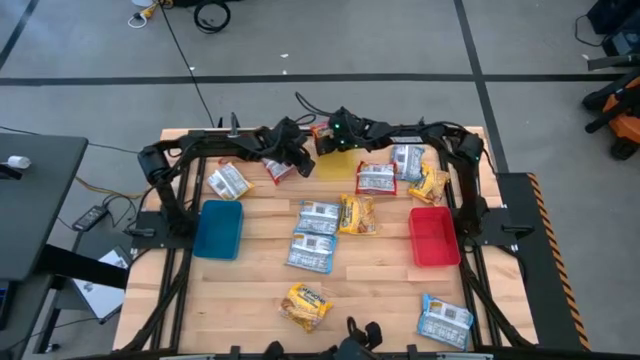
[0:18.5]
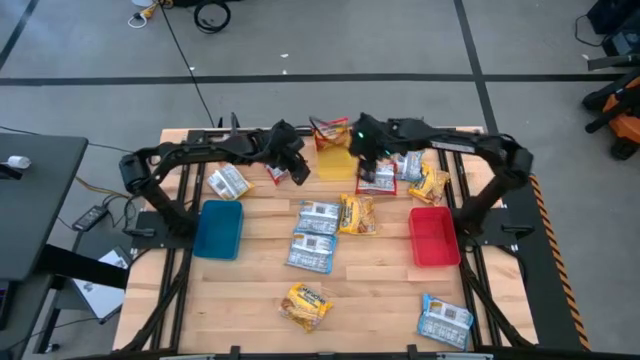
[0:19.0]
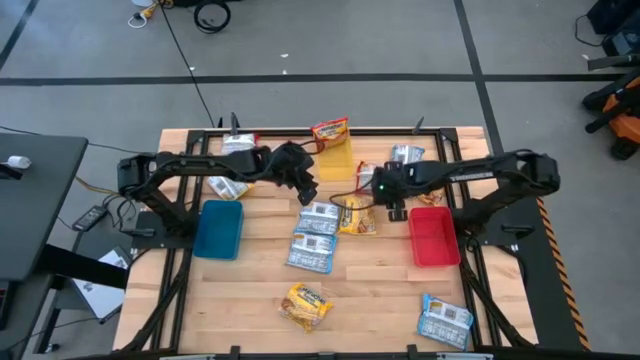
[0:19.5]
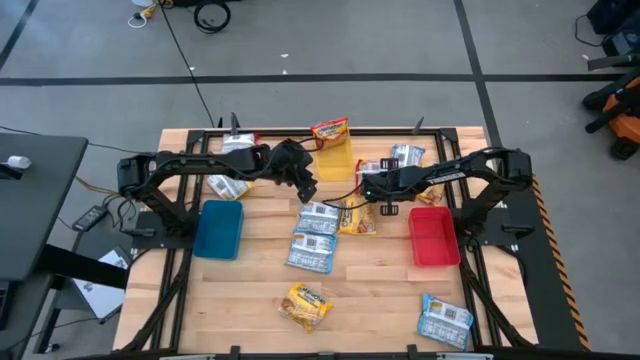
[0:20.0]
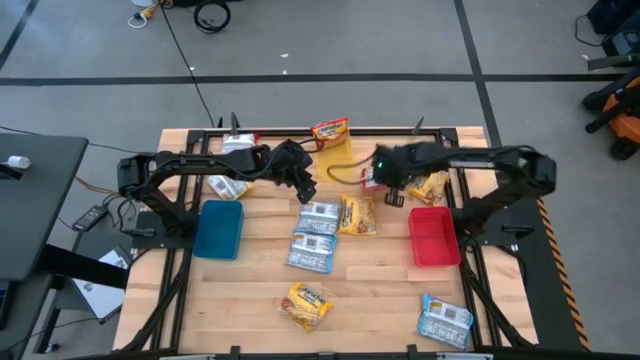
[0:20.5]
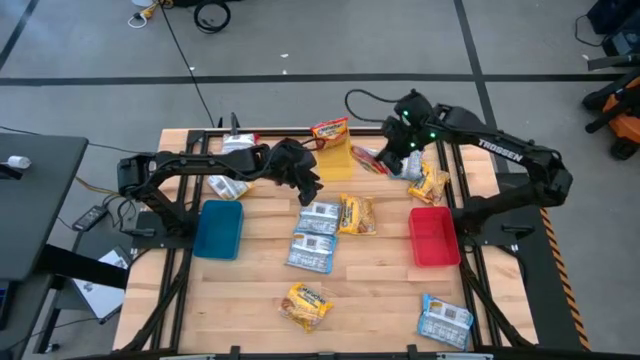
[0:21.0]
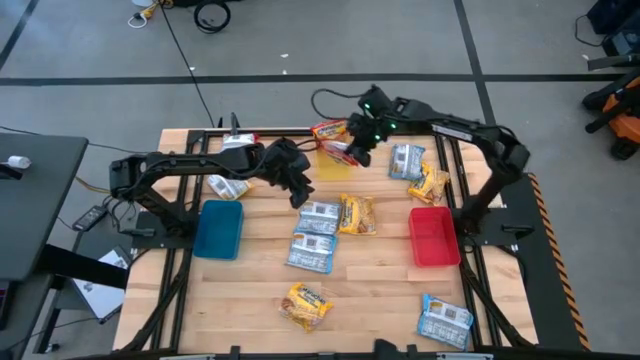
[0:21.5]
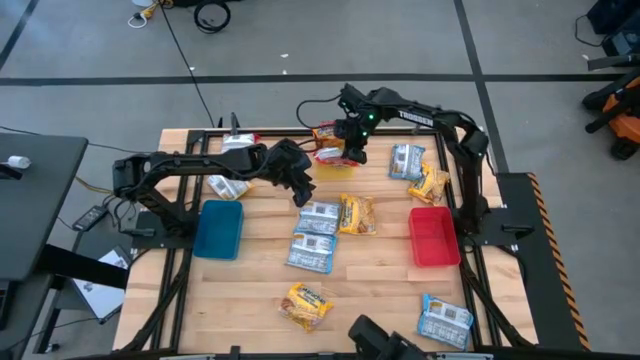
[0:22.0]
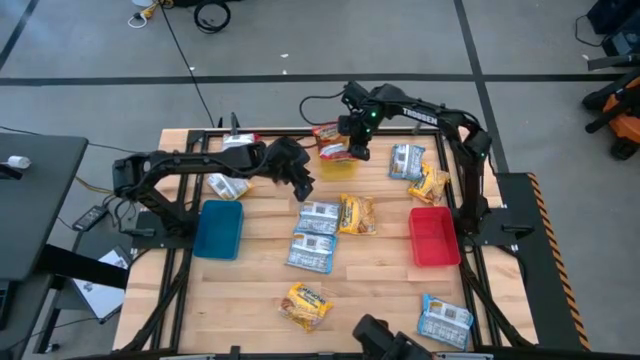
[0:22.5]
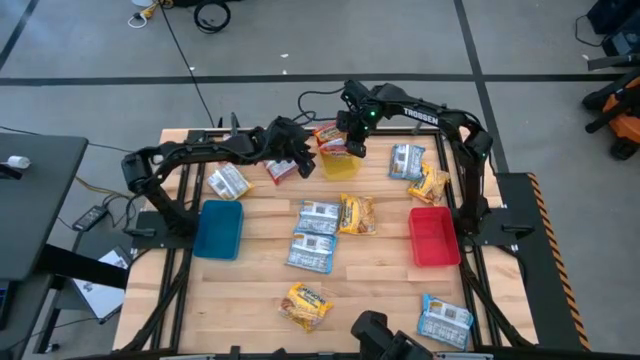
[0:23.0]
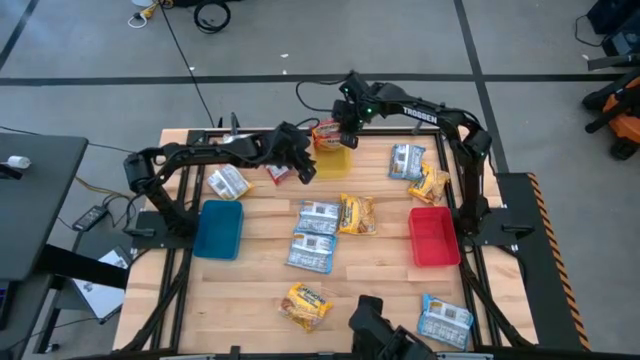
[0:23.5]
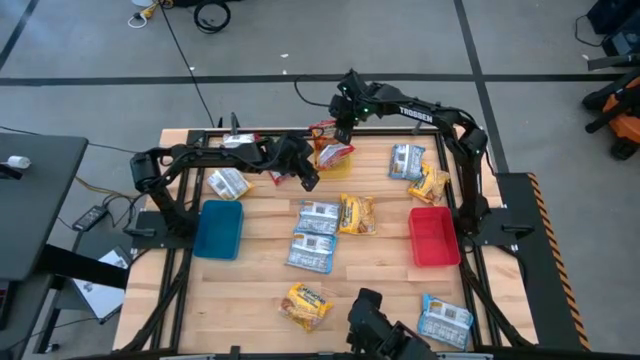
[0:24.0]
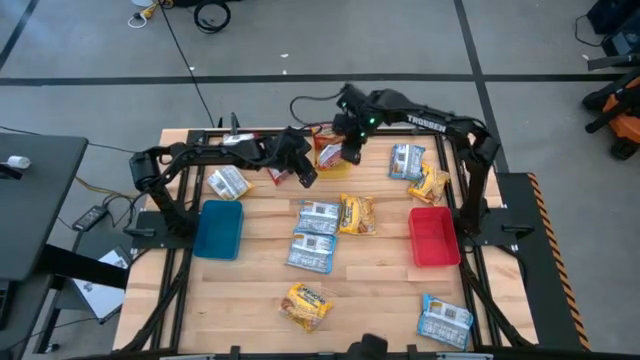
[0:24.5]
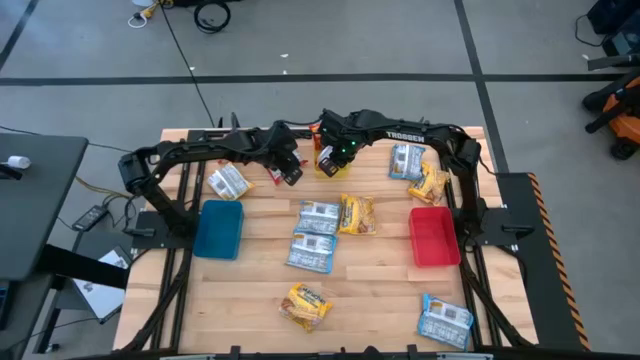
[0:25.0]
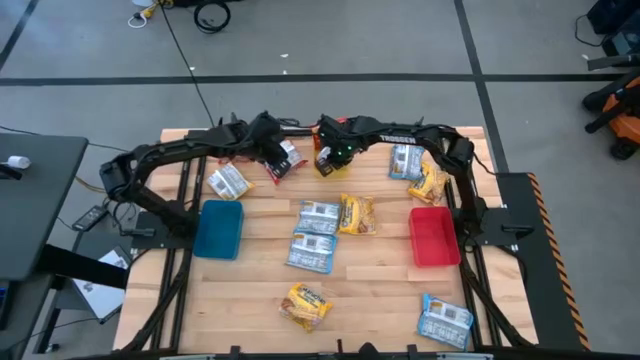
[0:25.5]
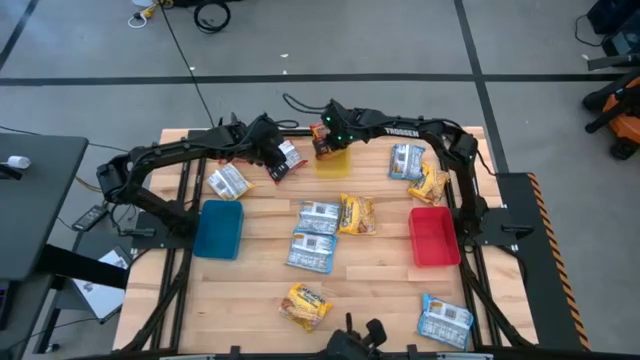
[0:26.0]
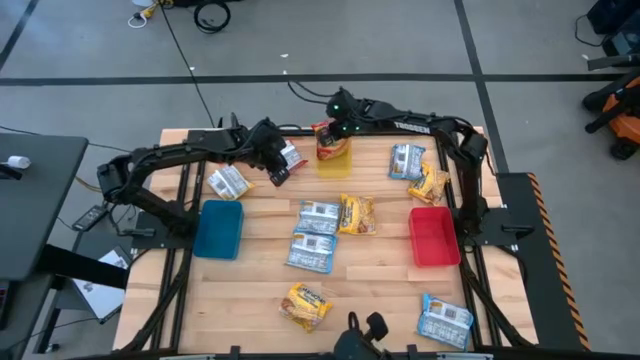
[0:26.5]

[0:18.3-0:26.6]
Task: Sort Maruchan noodles
Put the right red noodle pack into the yellow bin

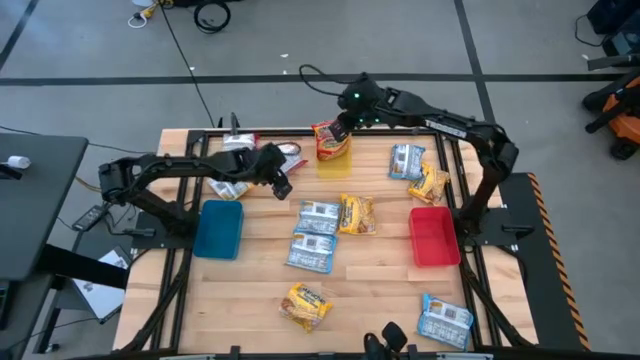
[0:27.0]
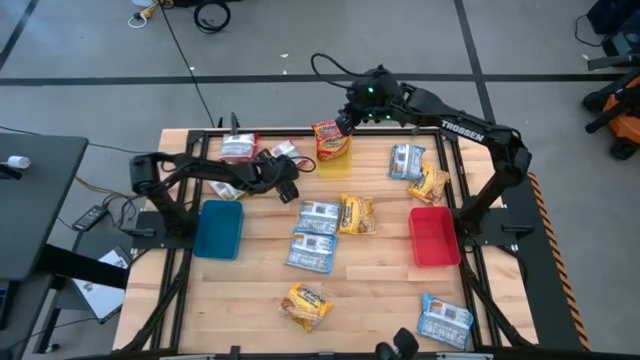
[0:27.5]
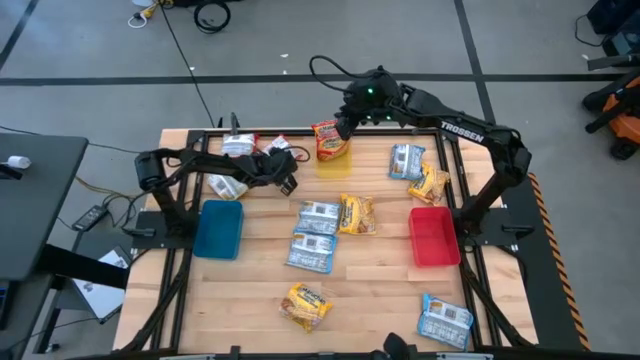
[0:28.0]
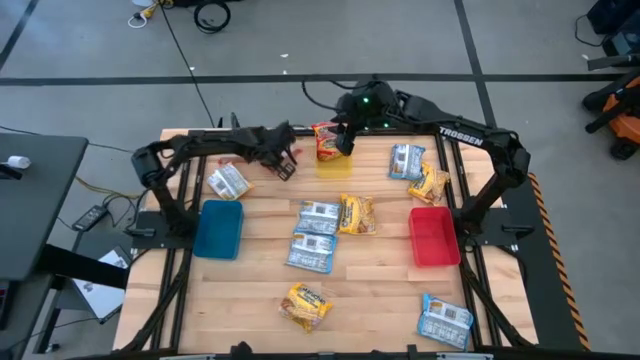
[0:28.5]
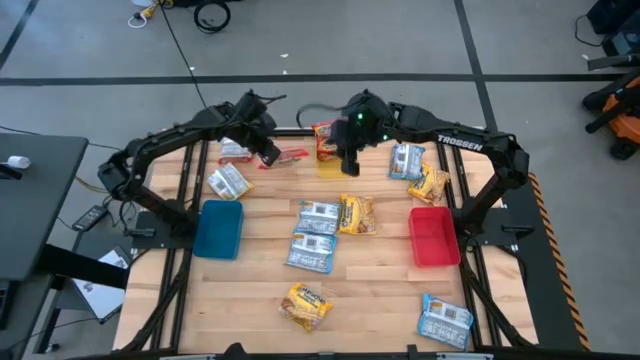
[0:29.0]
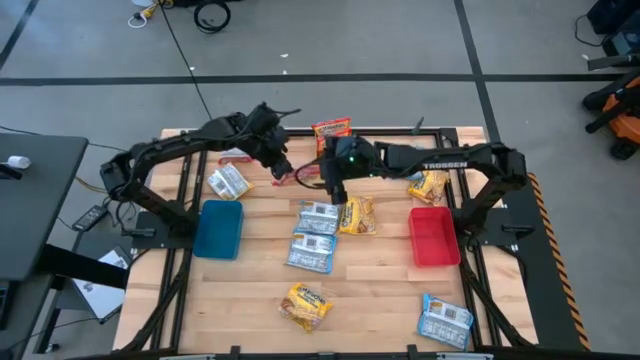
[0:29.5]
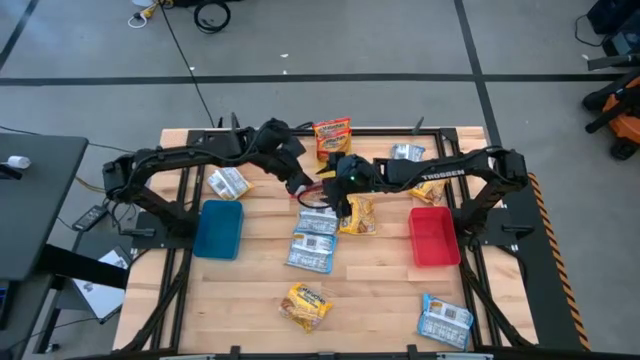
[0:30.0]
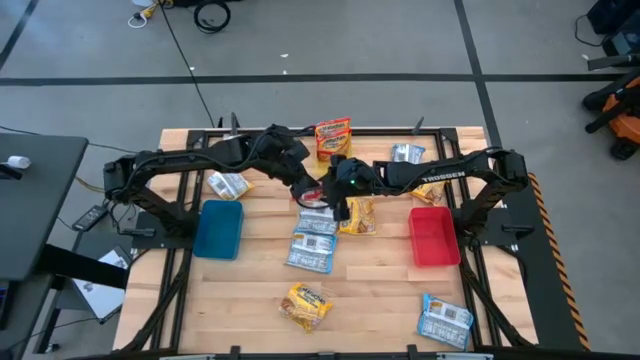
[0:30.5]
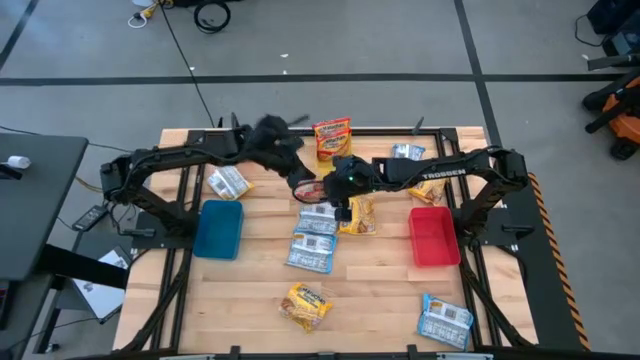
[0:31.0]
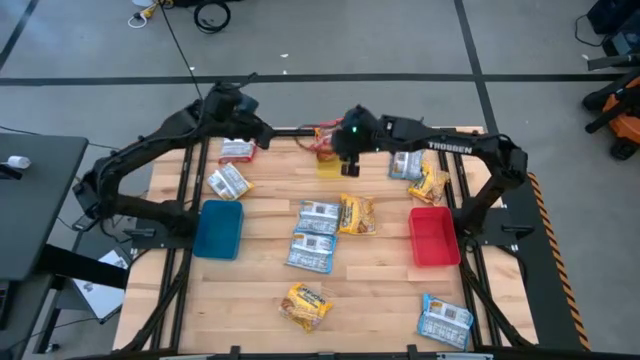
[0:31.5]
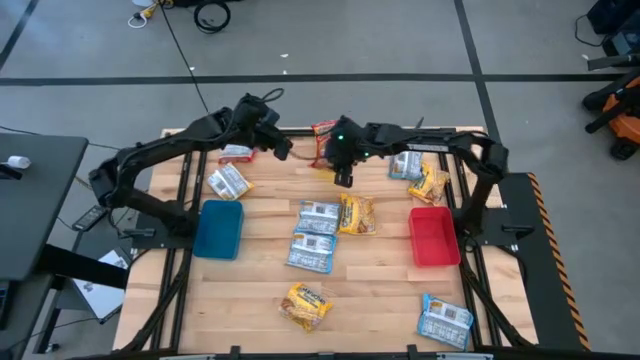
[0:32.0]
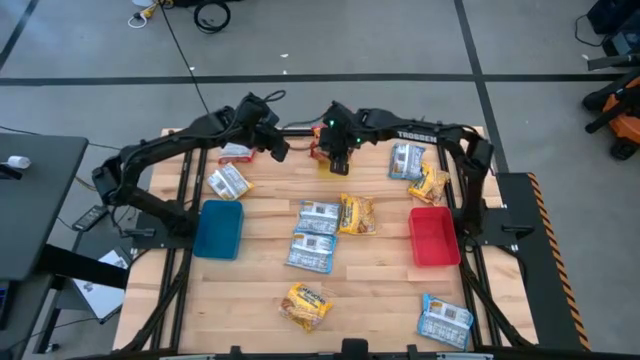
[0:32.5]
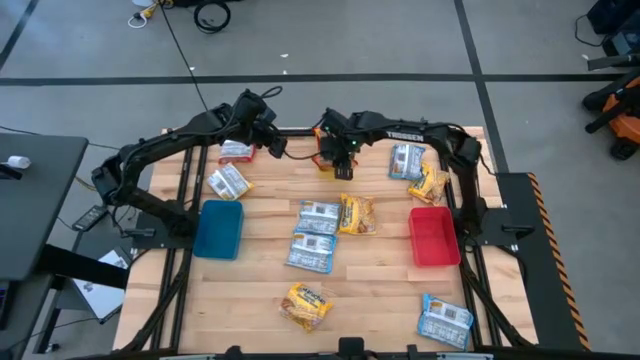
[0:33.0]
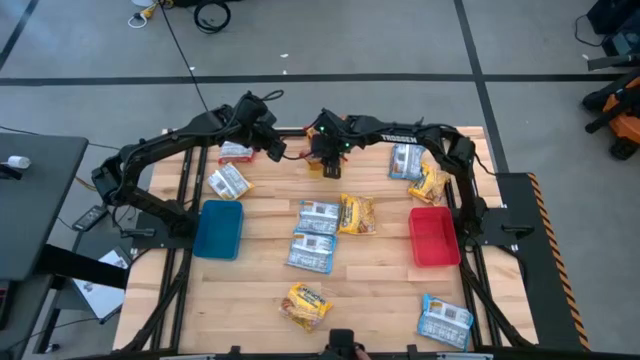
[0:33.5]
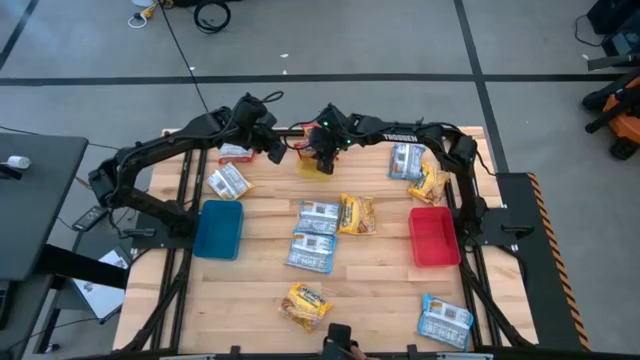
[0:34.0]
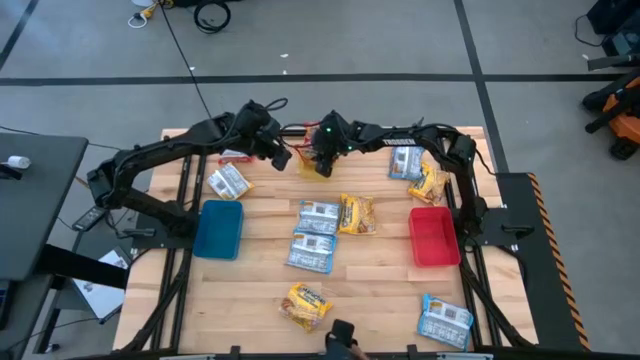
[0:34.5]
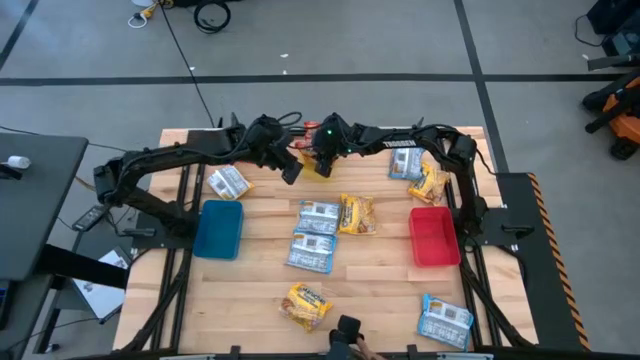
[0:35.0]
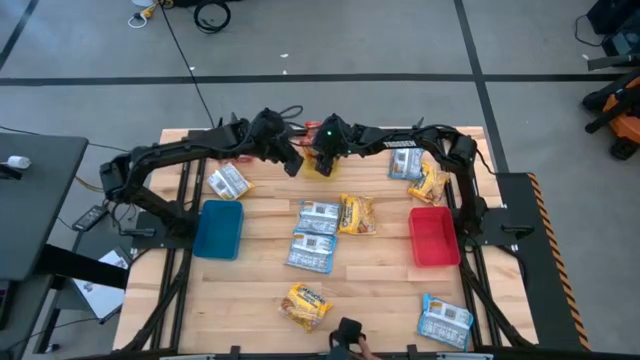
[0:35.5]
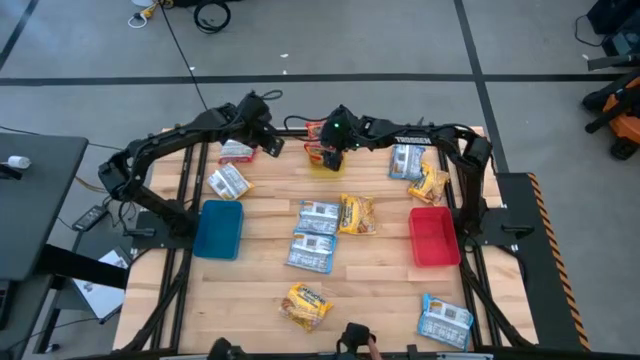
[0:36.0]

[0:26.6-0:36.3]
Put the right red noodle pack into the yellow bin

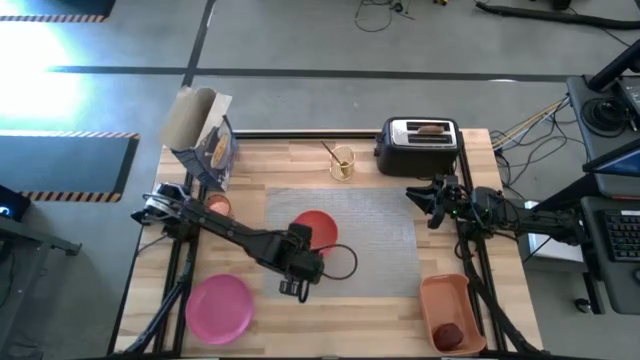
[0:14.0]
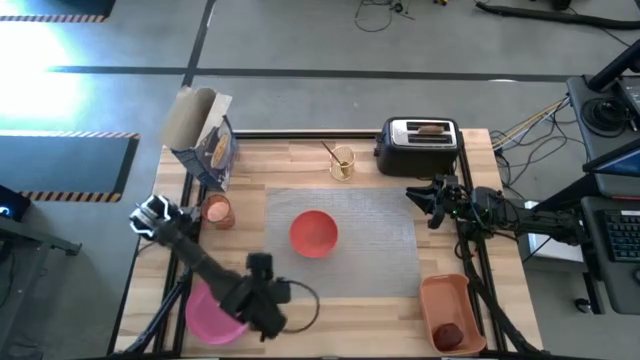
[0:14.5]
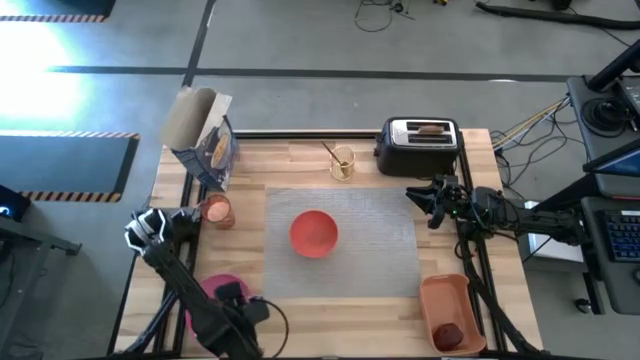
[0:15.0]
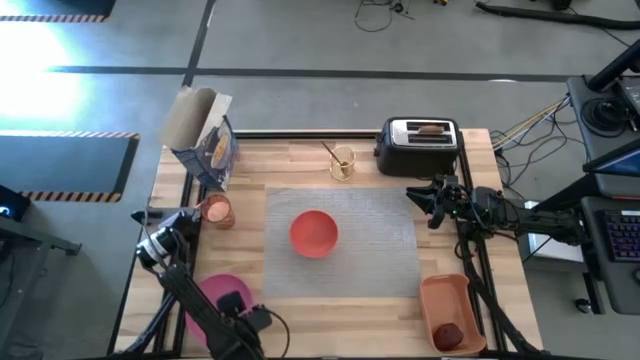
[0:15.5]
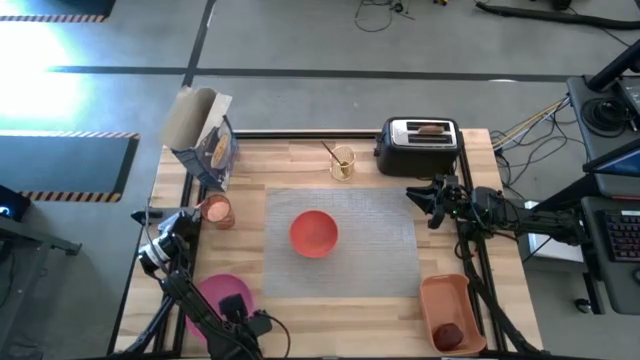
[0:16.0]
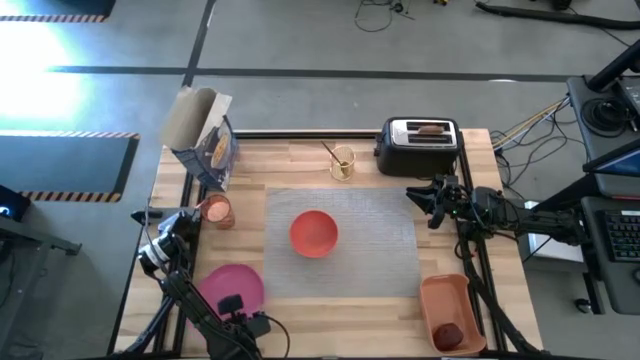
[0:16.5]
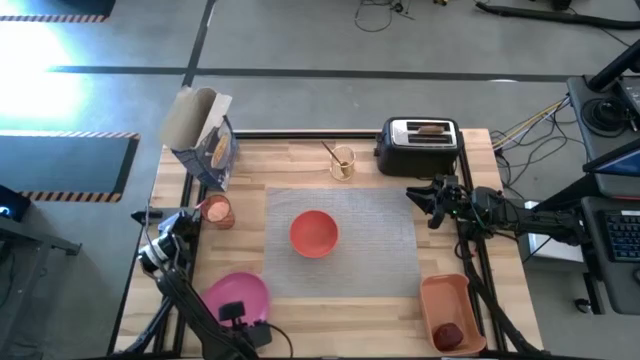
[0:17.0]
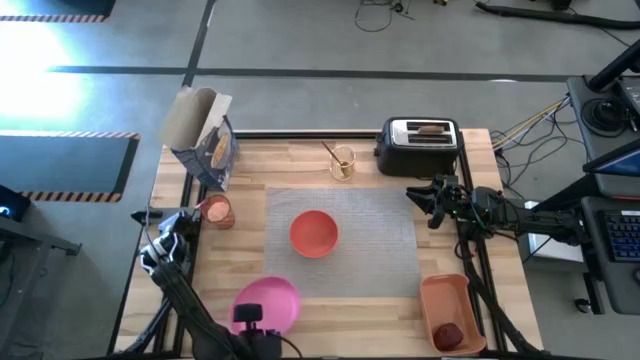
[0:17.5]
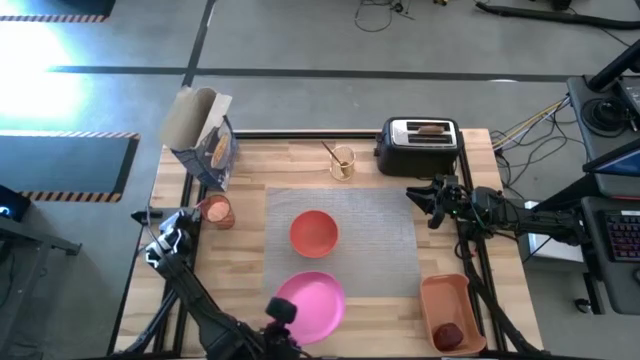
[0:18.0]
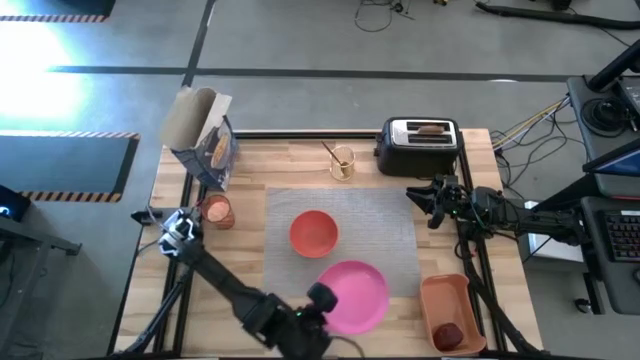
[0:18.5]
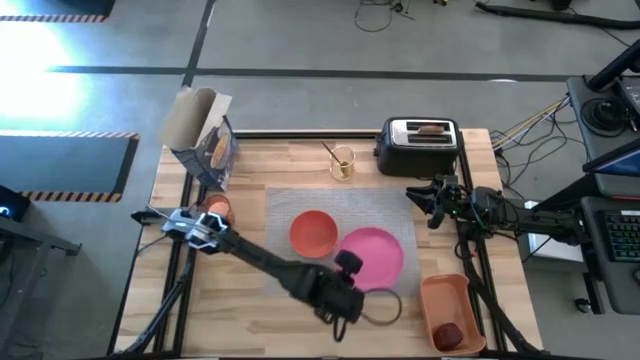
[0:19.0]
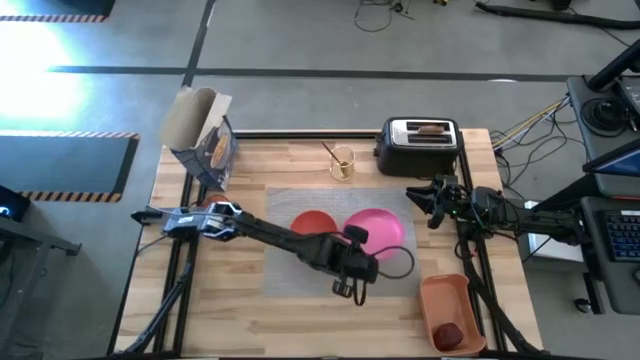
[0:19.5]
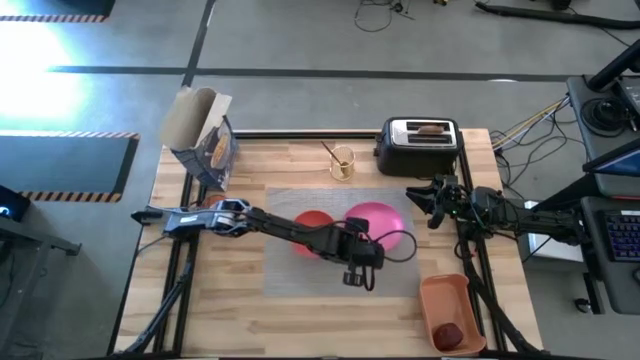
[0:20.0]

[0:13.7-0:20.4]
Task: Arrange a breakfast setting
Put the pink plate on the gray tablemat to the right of the orange bowl
